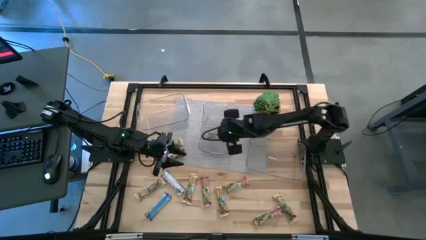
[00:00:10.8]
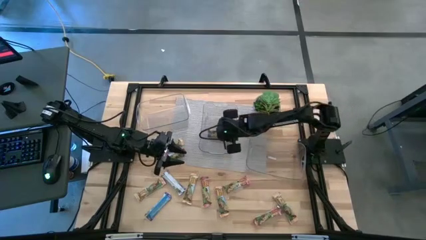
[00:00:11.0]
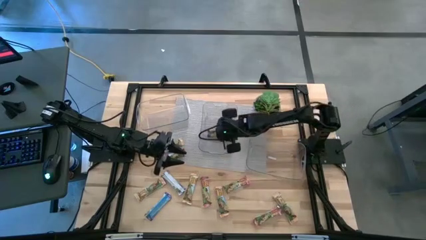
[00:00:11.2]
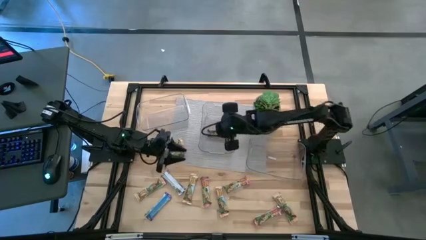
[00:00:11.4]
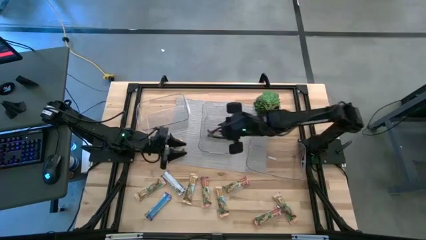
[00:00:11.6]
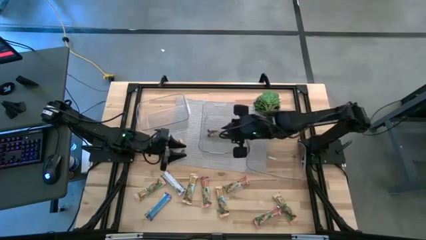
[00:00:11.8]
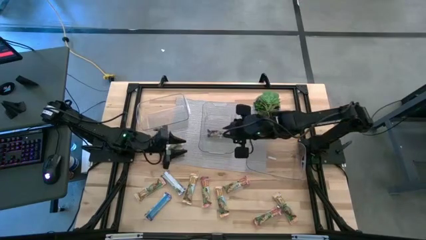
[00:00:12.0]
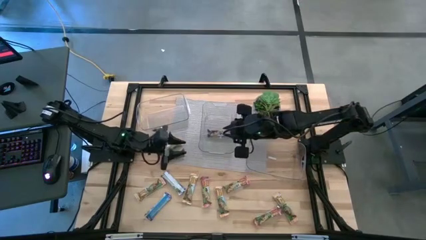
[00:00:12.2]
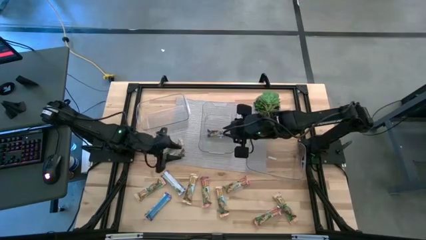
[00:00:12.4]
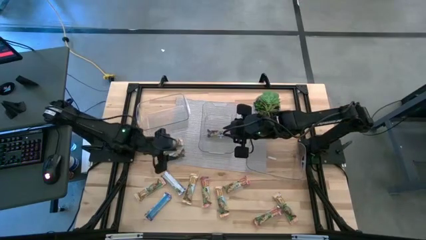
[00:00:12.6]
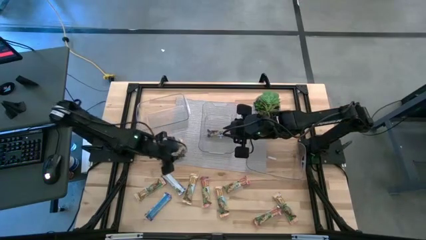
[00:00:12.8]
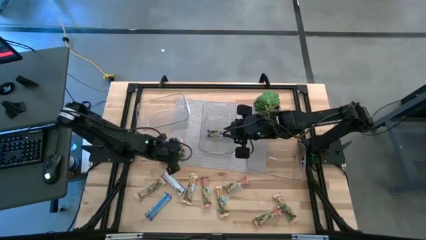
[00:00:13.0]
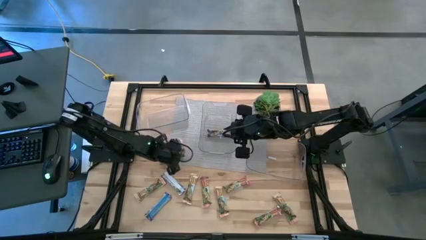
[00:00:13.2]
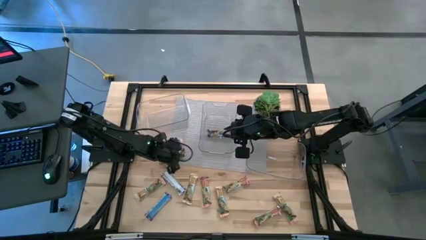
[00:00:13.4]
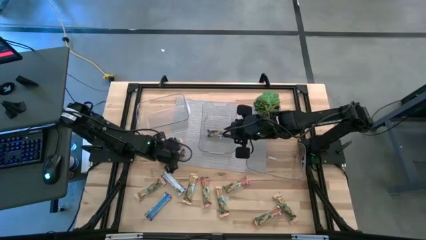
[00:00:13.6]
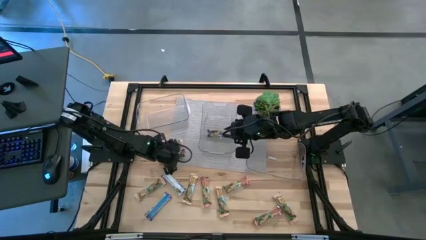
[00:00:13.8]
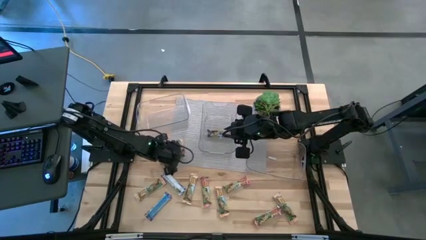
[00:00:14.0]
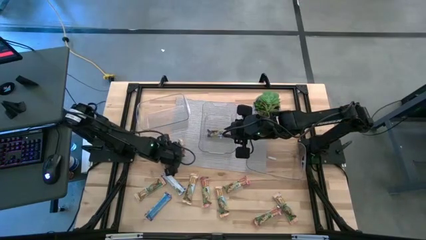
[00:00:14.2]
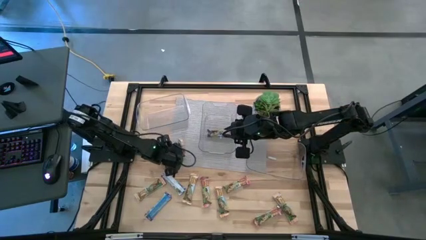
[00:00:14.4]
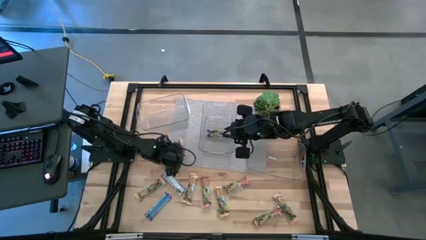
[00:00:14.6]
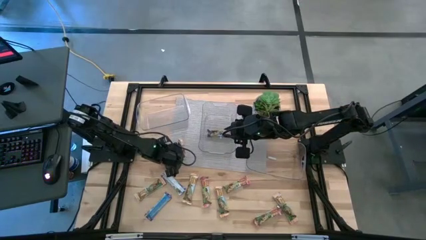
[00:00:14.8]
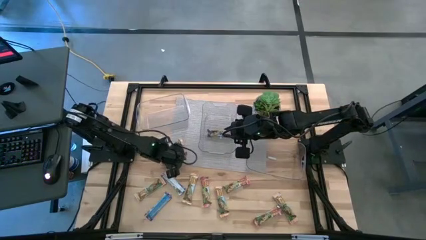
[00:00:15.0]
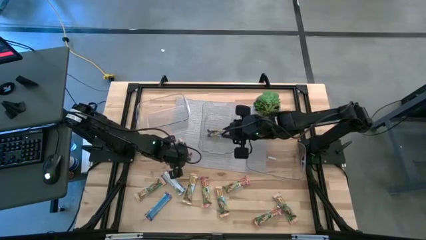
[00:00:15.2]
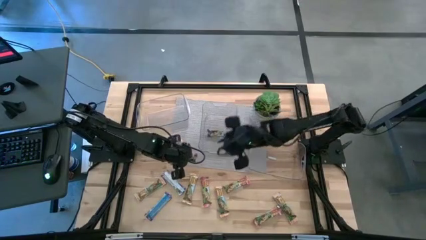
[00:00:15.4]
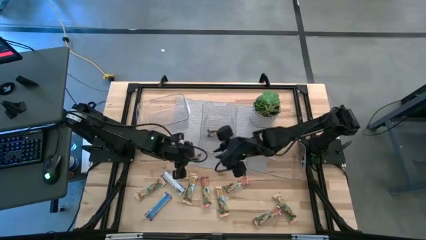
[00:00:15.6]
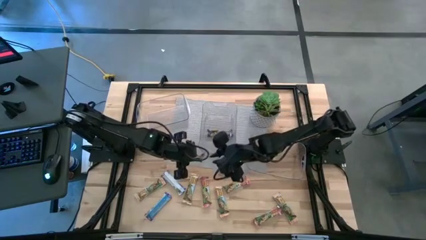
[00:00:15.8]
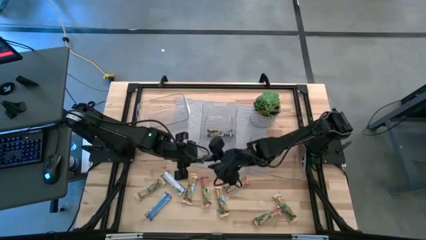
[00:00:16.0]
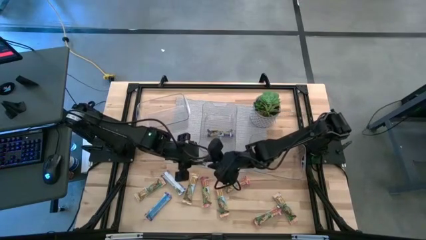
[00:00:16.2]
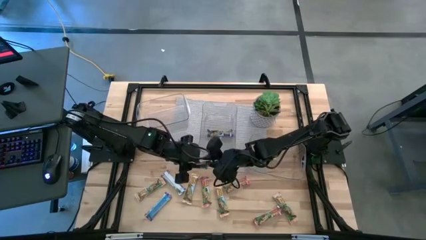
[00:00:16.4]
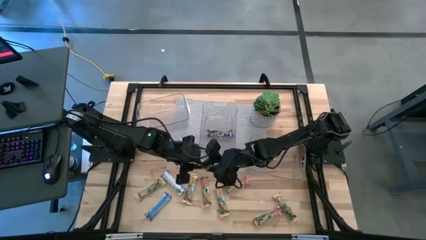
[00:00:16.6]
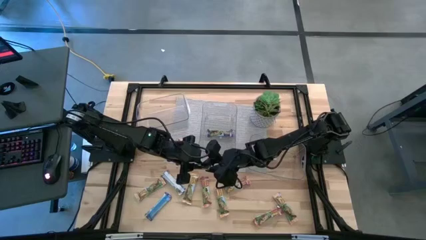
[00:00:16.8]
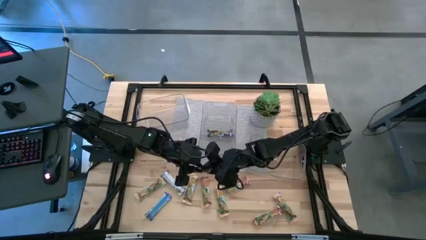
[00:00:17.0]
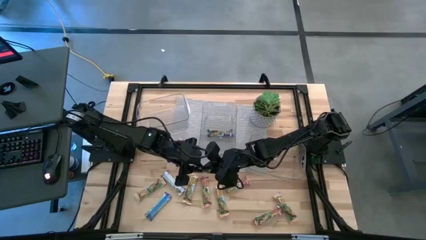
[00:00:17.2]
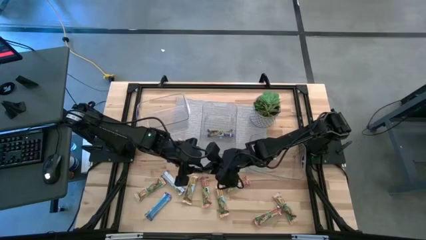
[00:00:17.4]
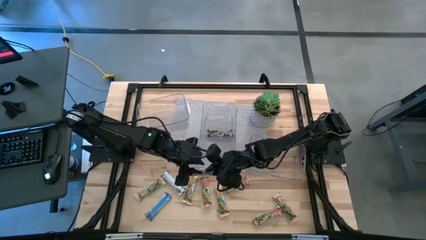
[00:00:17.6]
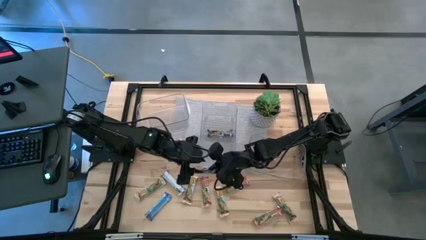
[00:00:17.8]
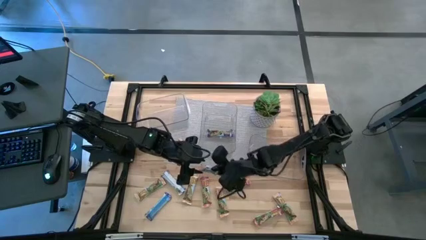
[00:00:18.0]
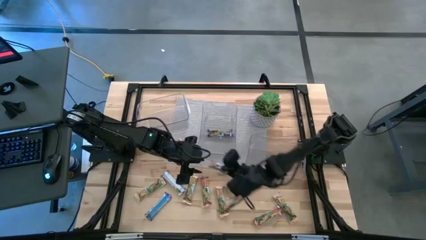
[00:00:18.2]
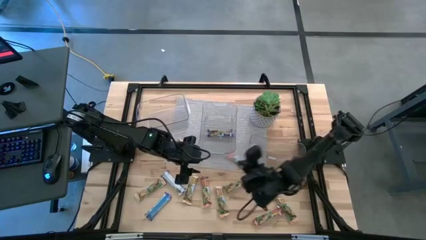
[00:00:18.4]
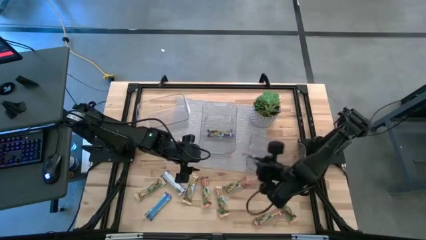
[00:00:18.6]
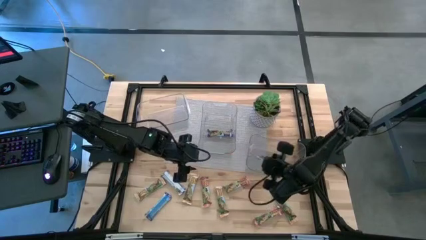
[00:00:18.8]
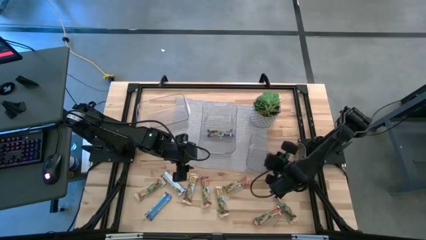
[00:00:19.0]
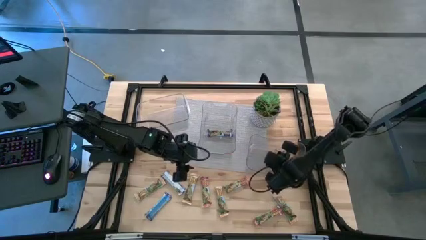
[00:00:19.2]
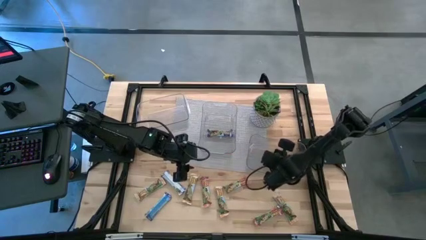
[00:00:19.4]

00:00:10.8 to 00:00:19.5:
Task: Pick and place Granola Bars by type
Put the red granola bar into the right transparent bin

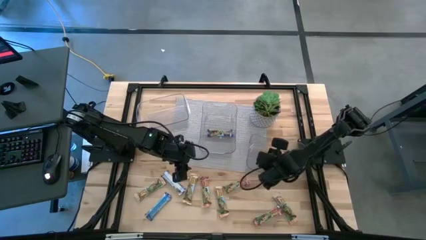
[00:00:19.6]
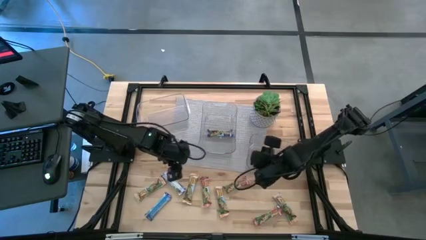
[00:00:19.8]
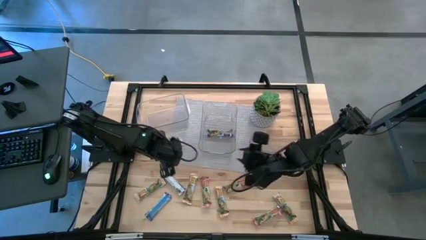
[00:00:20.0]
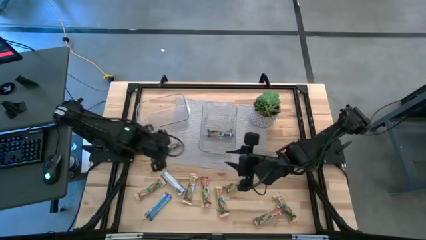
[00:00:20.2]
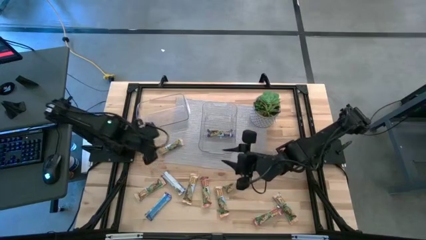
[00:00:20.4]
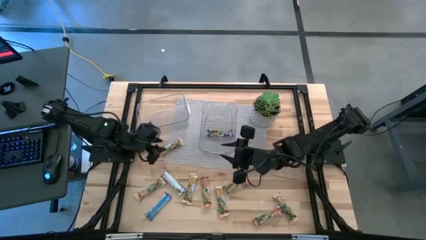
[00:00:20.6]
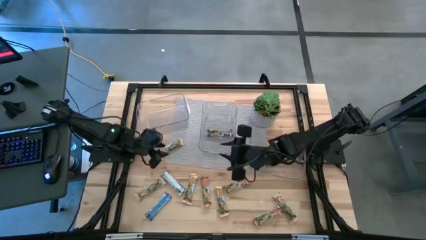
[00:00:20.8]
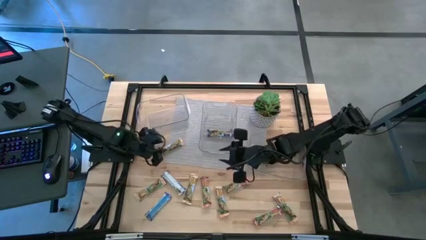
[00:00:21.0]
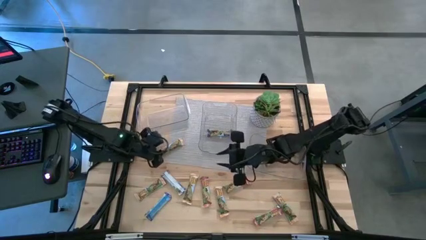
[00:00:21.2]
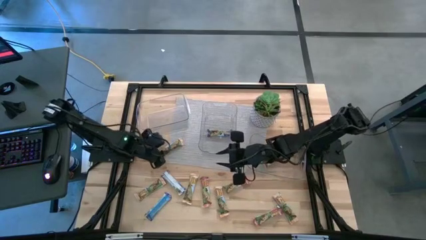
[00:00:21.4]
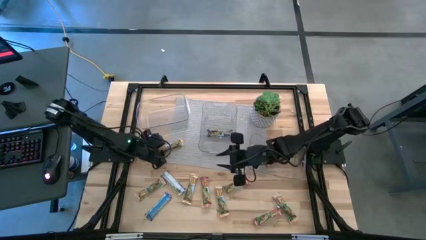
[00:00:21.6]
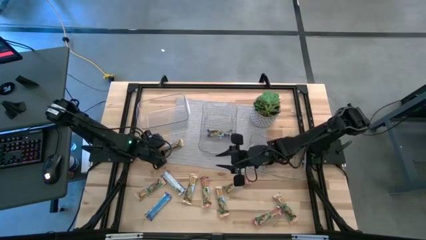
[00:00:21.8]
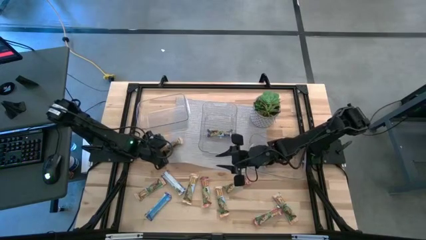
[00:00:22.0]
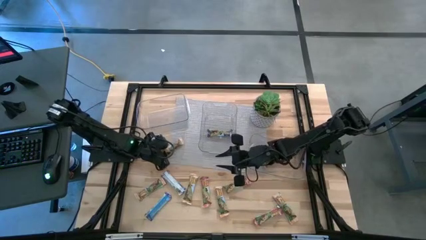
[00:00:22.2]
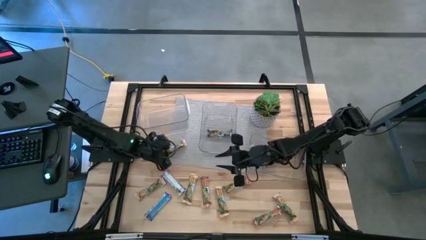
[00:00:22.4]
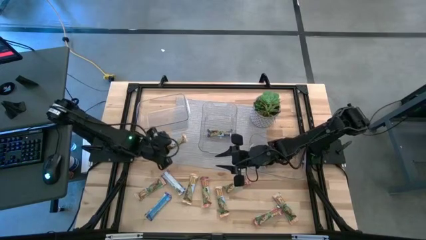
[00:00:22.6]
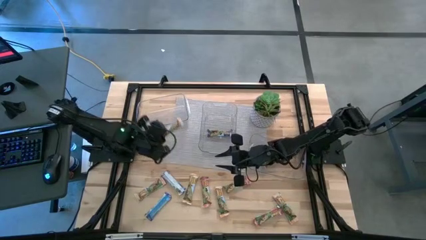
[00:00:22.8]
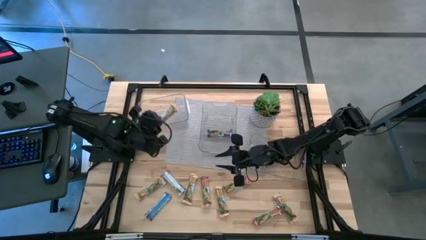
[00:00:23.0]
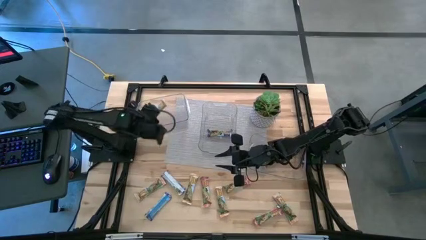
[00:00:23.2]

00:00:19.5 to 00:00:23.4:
Put the yellow granola bar into the left transparent bin
